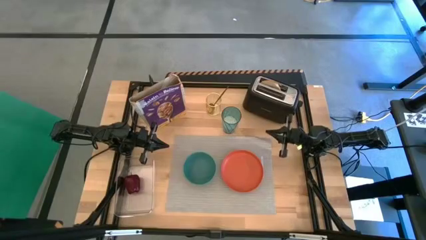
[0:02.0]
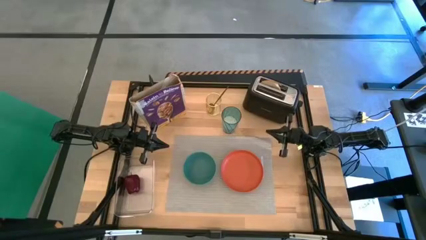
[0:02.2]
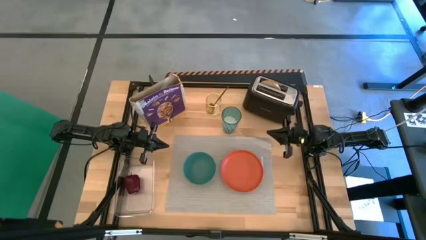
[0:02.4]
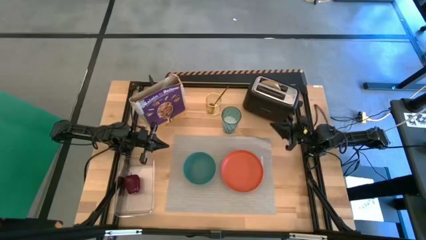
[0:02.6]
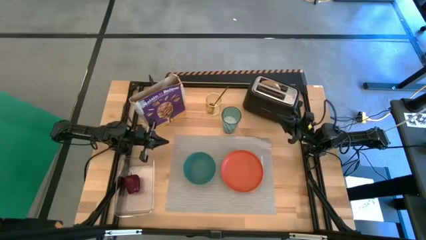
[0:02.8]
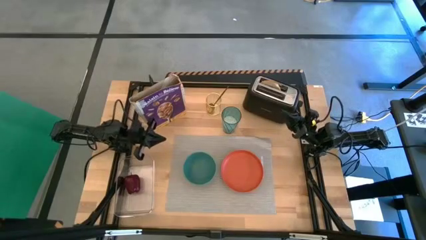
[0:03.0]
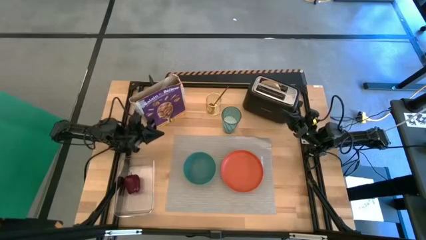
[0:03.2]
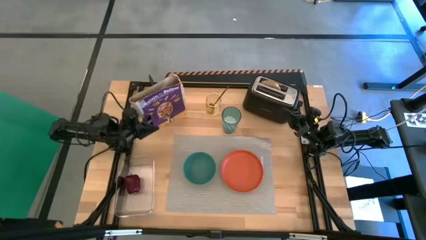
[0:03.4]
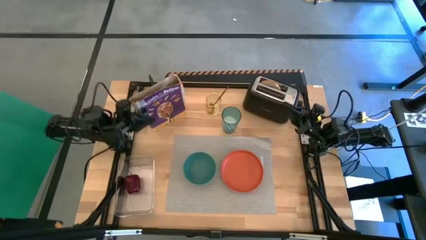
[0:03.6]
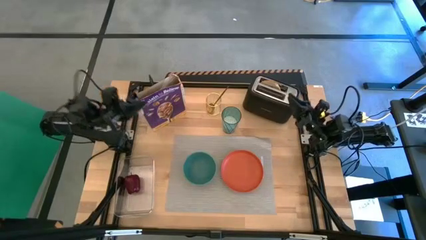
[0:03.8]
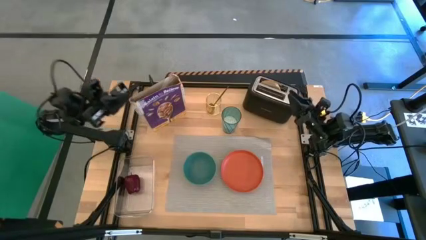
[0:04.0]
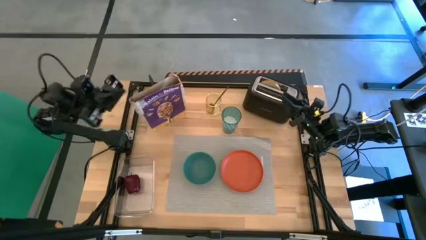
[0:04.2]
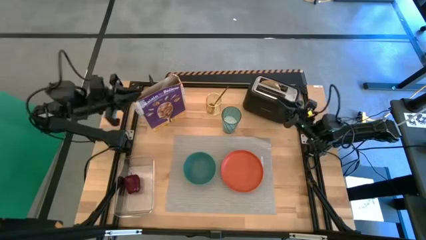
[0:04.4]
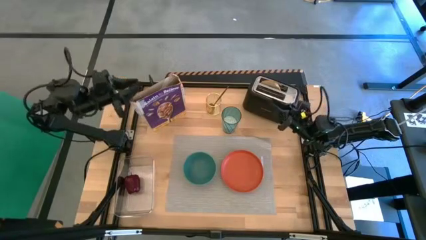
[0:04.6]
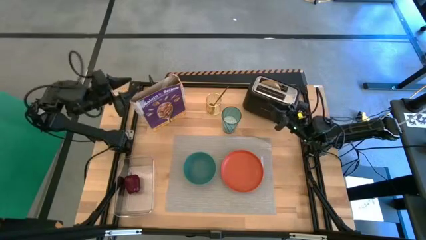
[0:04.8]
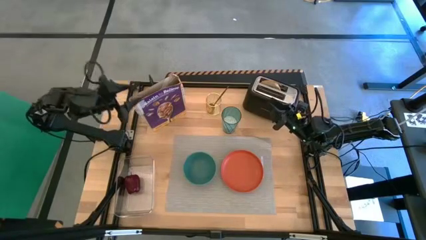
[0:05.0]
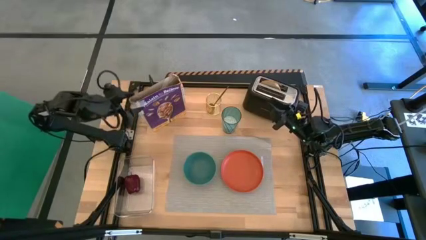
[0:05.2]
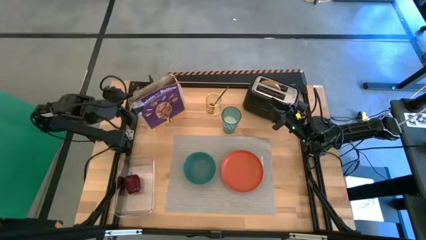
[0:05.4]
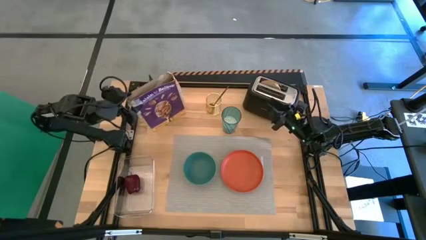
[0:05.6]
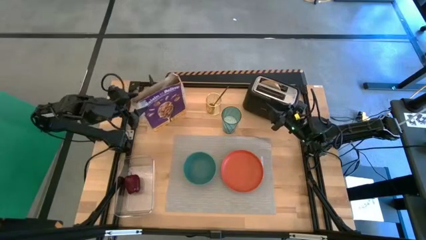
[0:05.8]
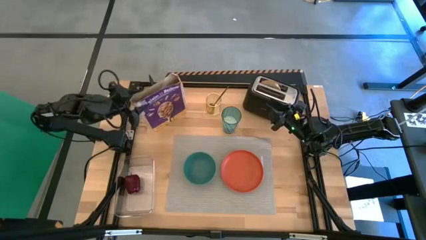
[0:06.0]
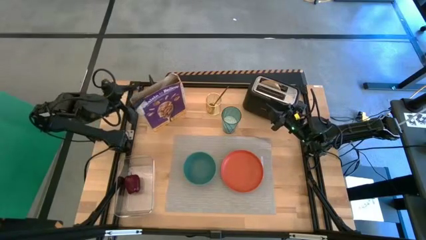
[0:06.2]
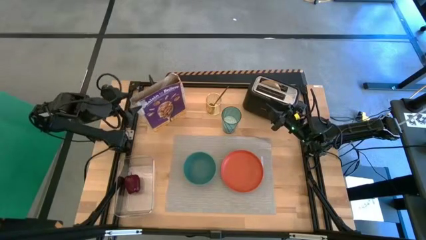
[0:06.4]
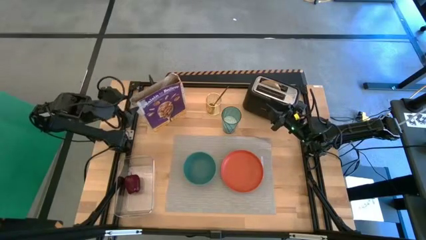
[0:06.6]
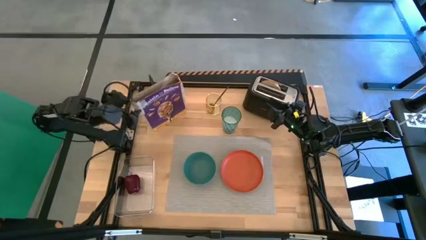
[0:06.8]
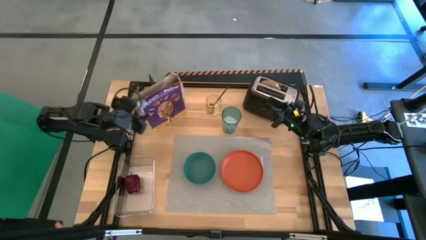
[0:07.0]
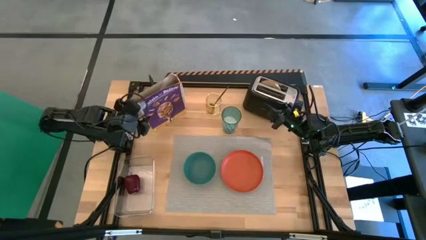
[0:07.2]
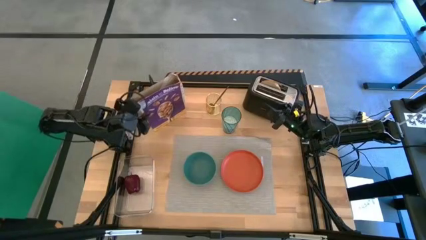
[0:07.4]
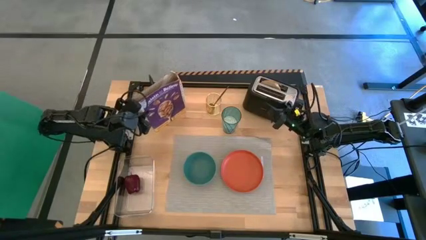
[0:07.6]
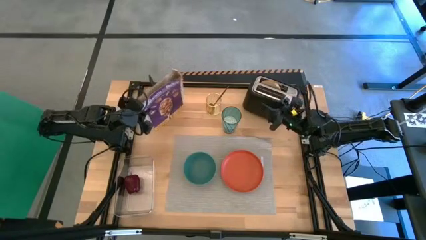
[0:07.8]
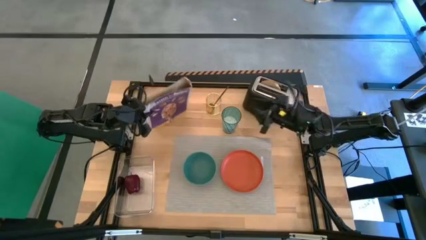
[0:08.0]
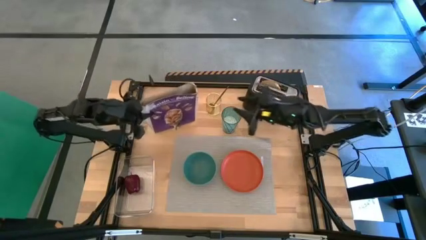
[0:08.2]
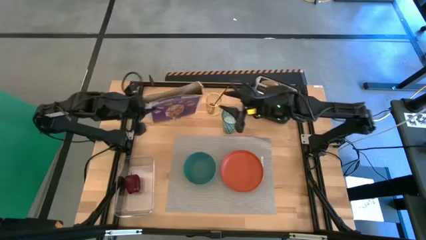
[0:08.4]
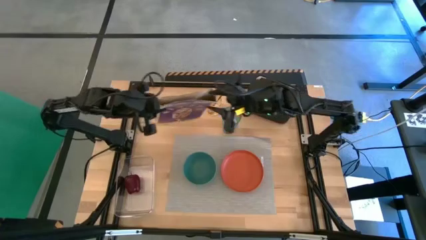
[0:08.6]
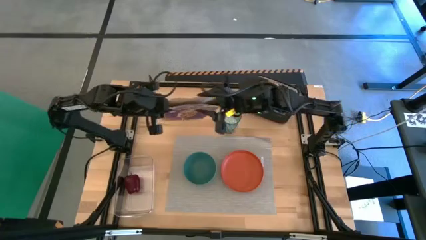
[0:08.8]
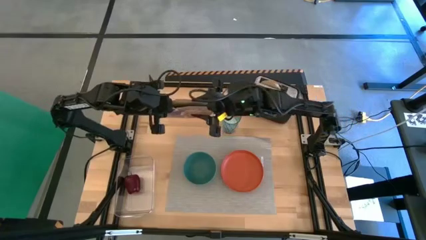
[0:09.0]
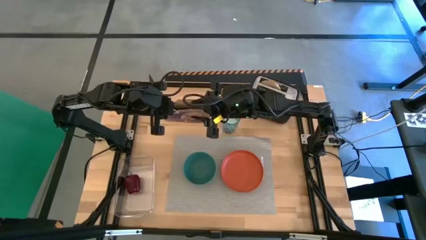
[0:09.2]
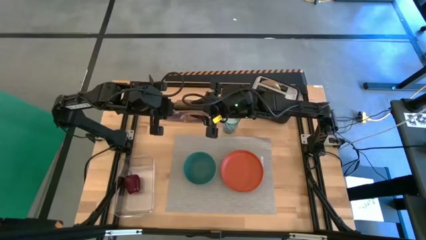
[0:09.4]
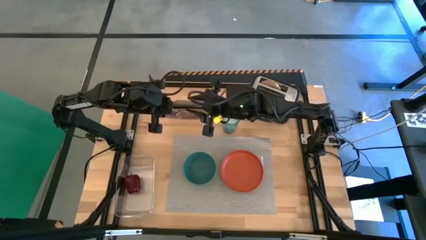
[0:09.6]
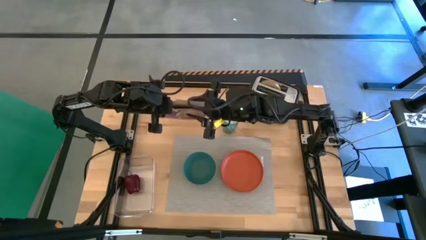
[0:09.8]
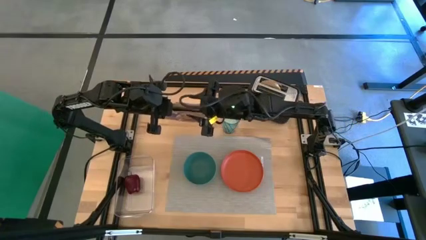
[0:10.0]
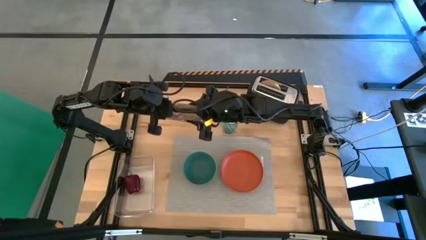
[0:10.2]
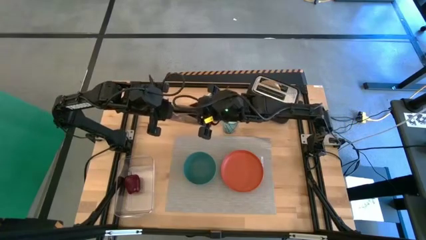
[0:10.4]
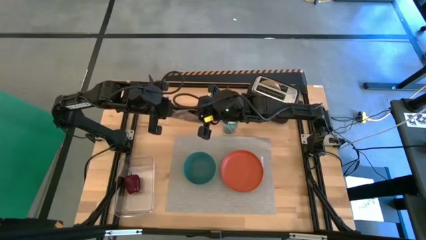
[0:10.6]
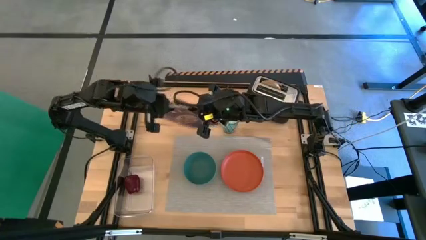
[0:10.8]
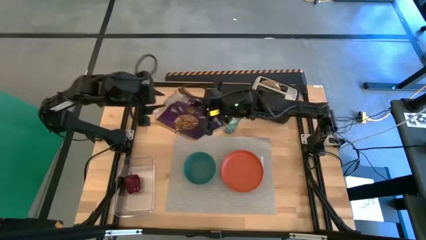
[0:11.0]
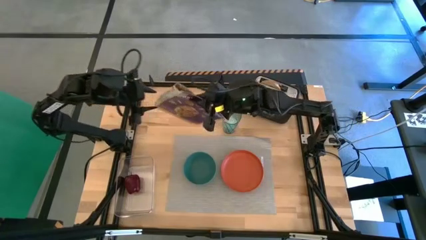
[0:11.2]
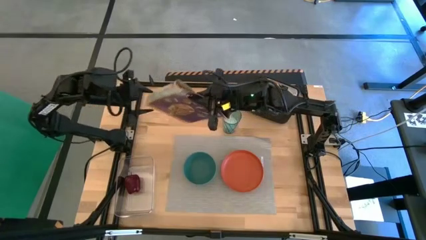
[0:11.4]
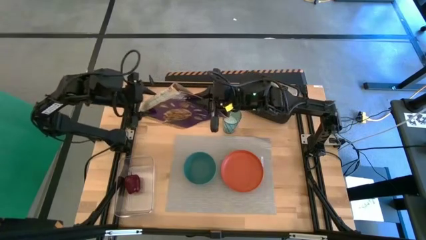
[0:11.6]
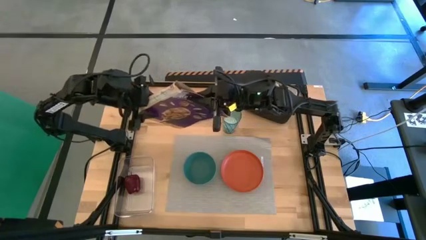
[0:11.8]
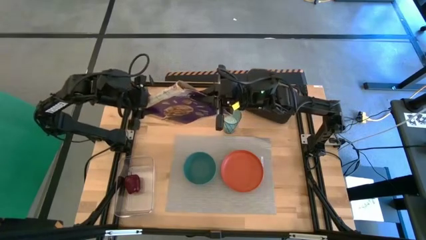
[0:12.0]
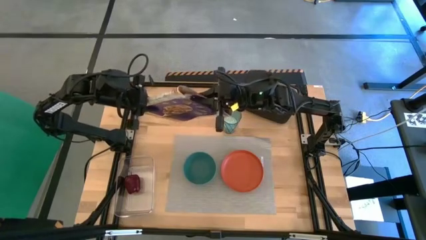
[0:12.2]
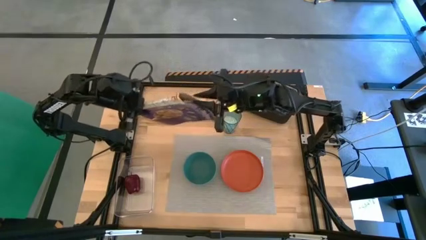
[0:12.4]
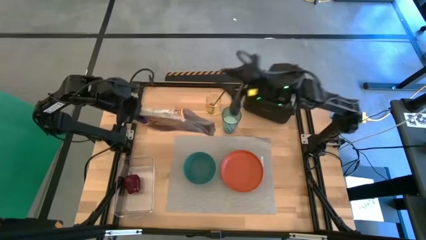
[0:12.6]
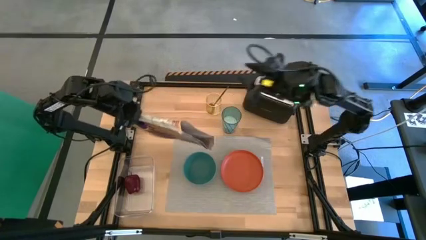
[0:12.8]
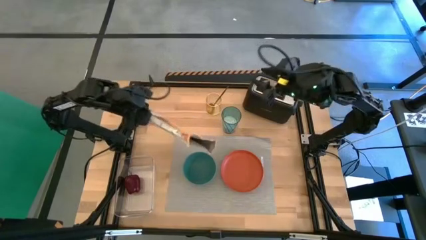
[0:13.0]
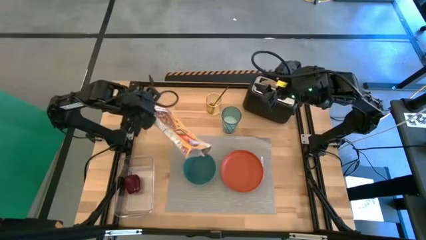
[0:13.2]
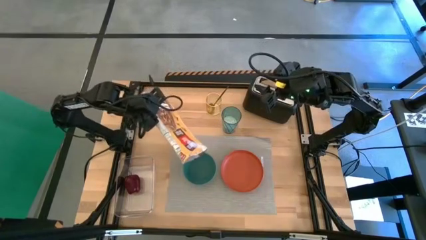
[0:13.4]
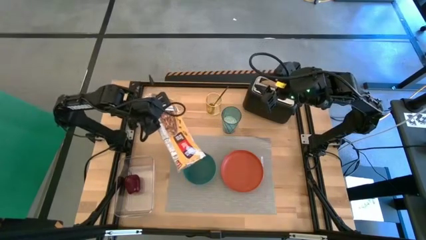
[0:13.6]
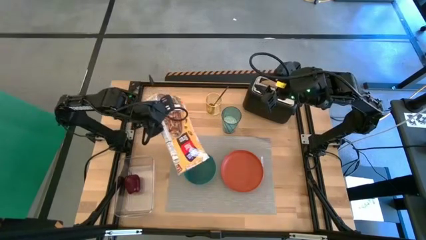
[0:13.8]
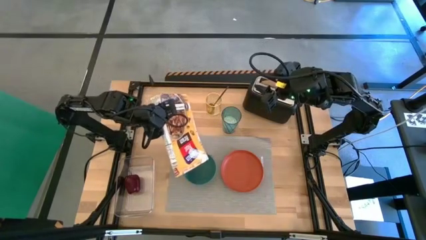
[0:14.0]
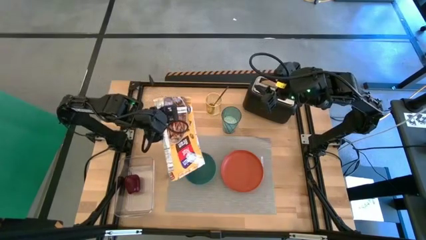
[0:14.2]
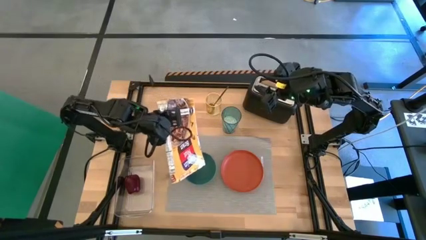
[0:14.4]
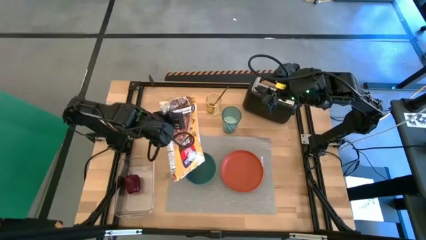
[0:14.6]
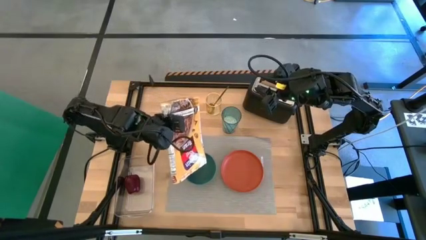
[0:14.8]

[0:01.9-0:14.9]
Task: Arrange a breakfast setting
Pour the cereals from the cereal box into the green bowl
